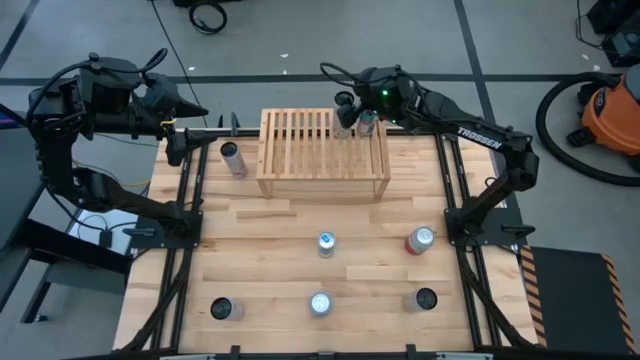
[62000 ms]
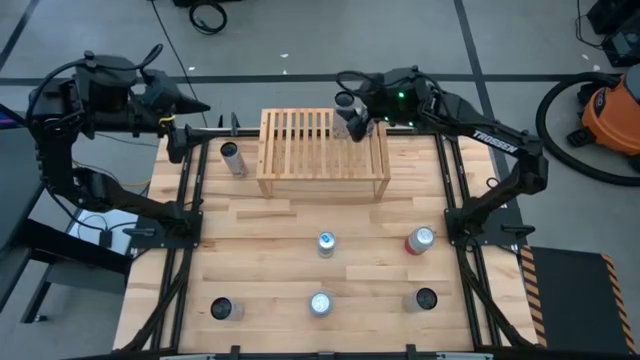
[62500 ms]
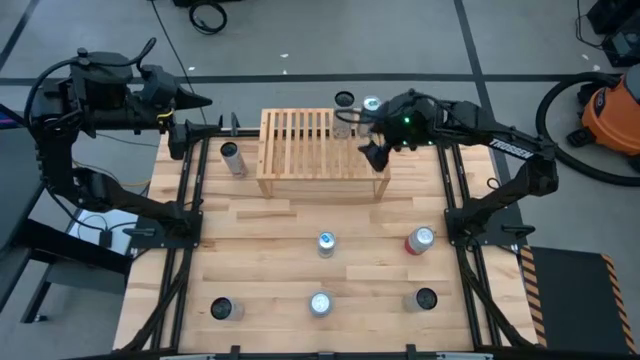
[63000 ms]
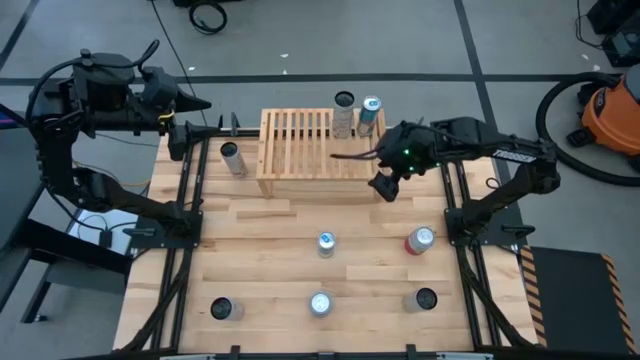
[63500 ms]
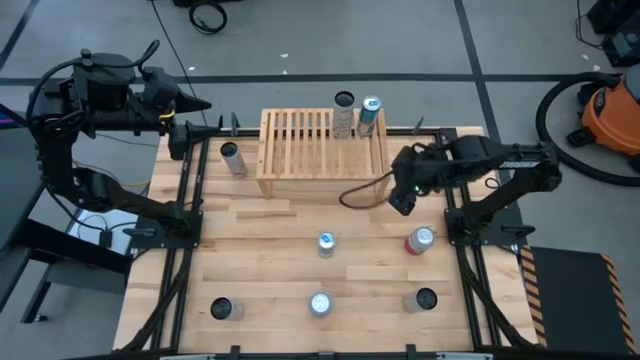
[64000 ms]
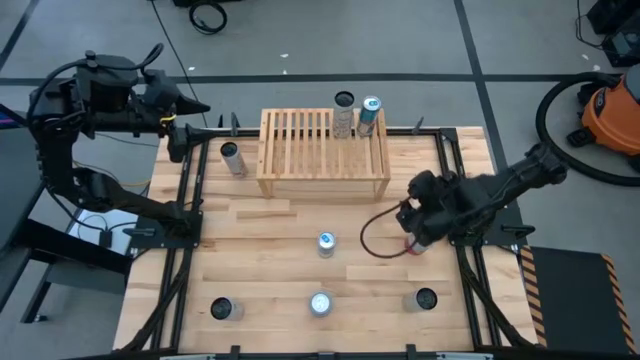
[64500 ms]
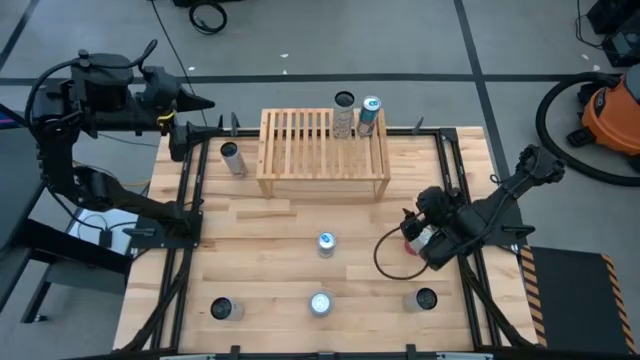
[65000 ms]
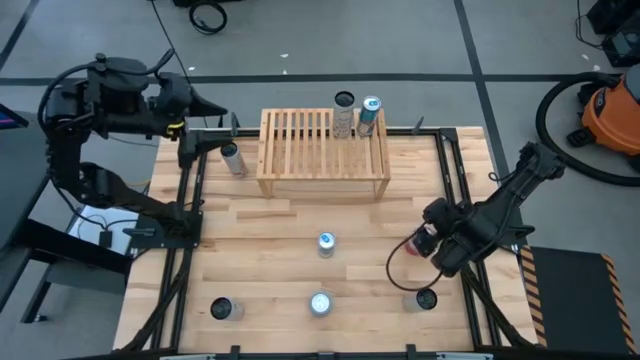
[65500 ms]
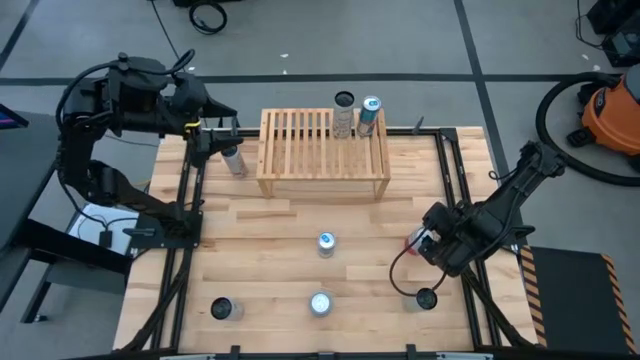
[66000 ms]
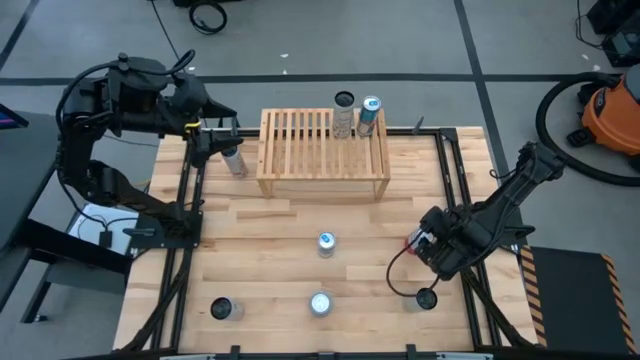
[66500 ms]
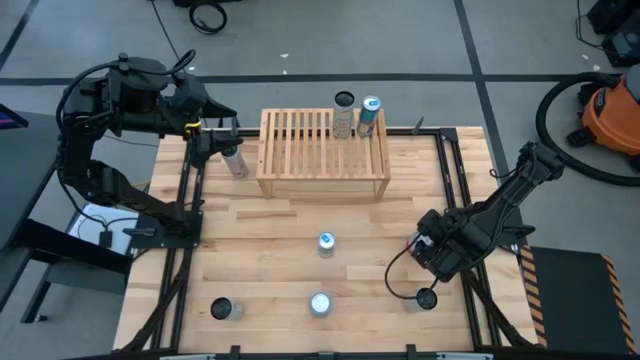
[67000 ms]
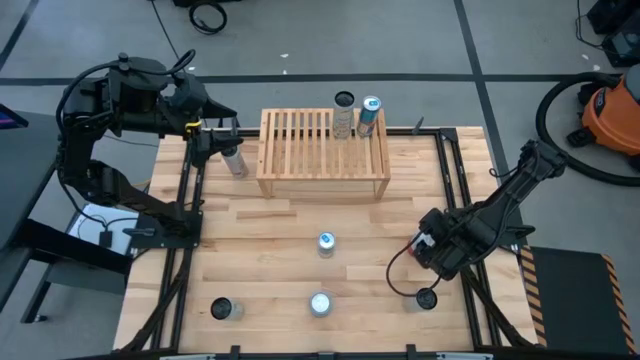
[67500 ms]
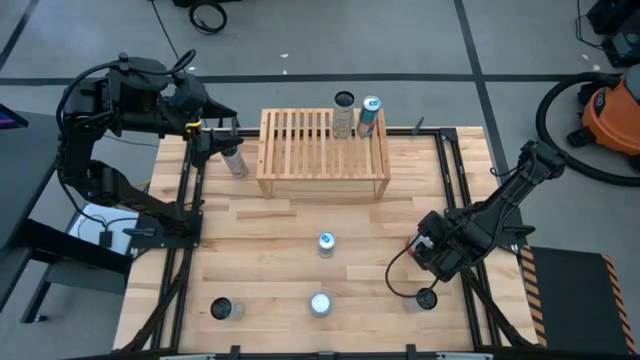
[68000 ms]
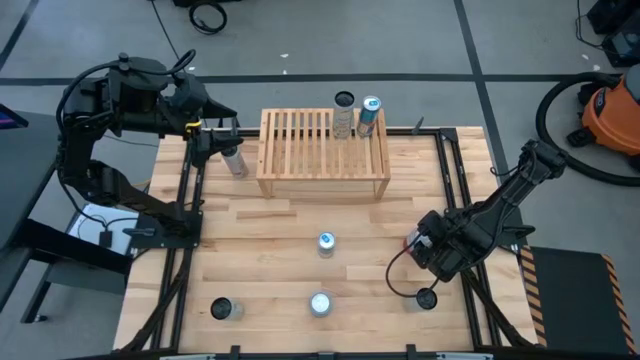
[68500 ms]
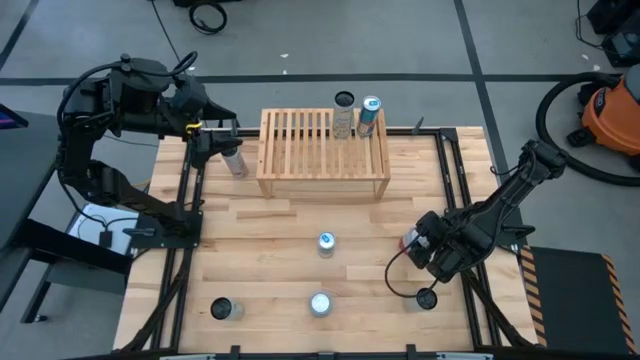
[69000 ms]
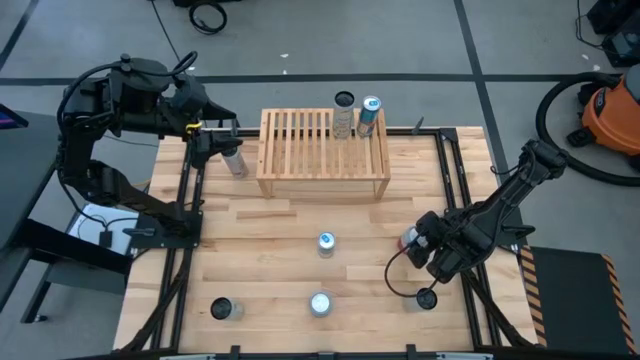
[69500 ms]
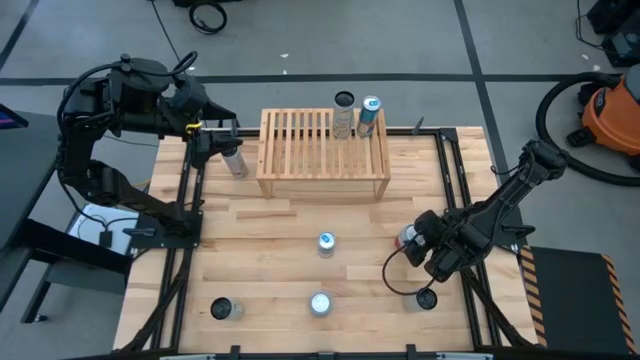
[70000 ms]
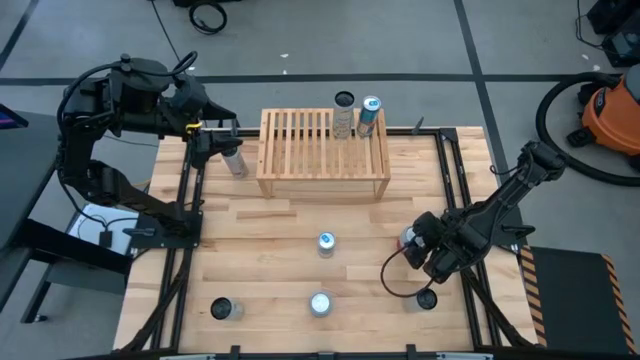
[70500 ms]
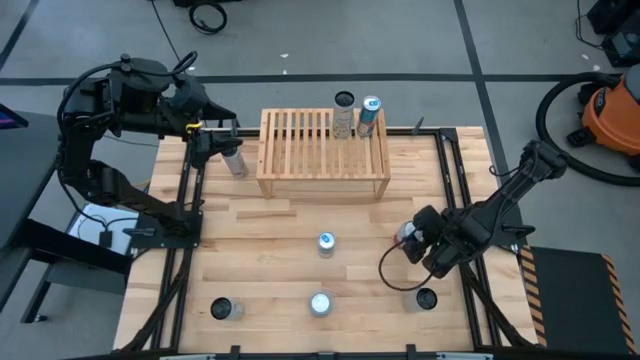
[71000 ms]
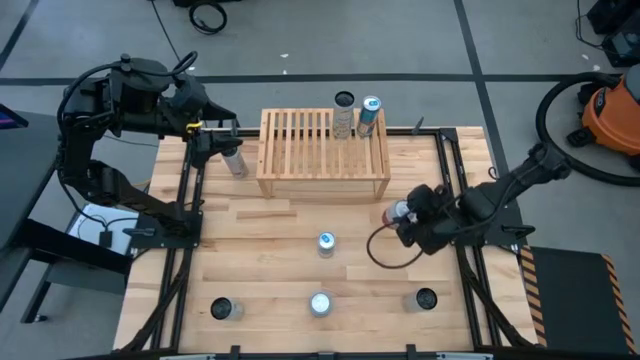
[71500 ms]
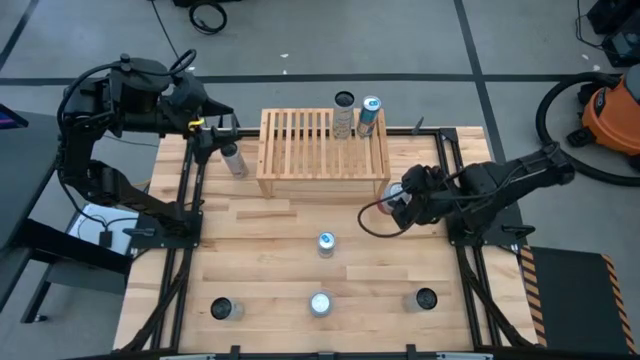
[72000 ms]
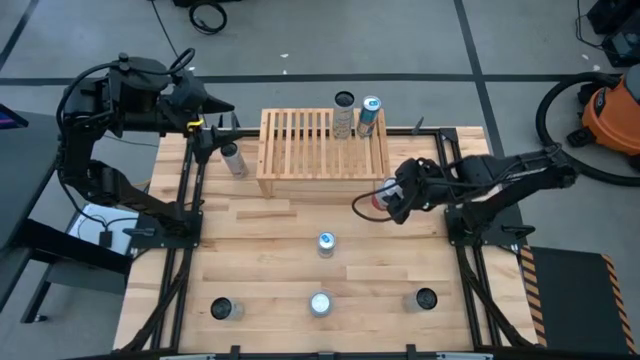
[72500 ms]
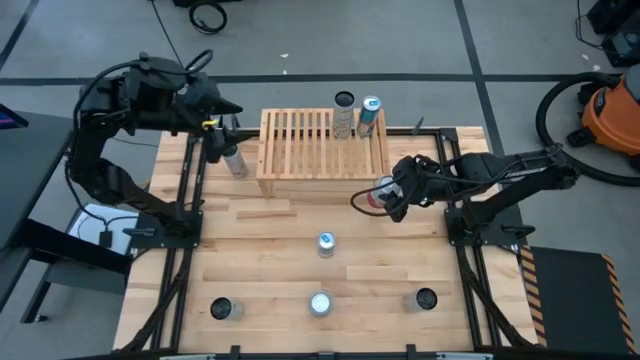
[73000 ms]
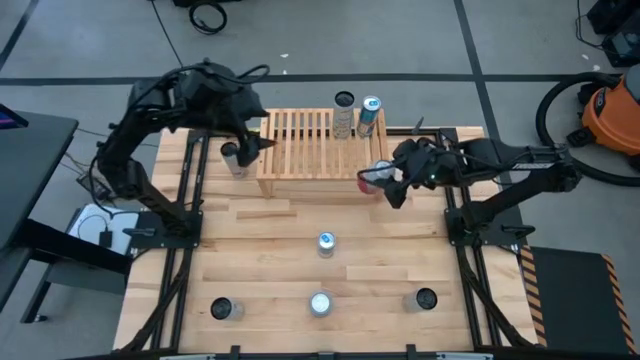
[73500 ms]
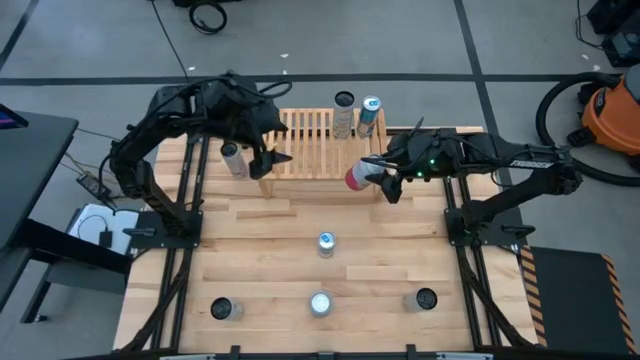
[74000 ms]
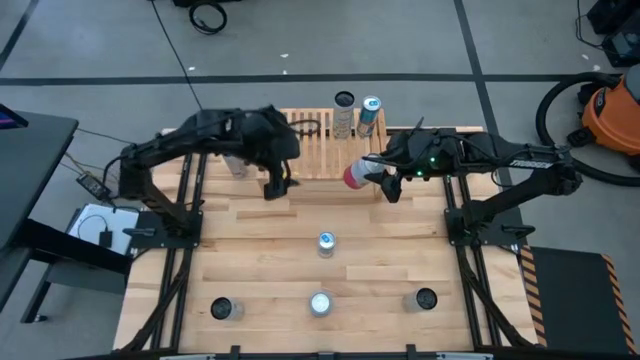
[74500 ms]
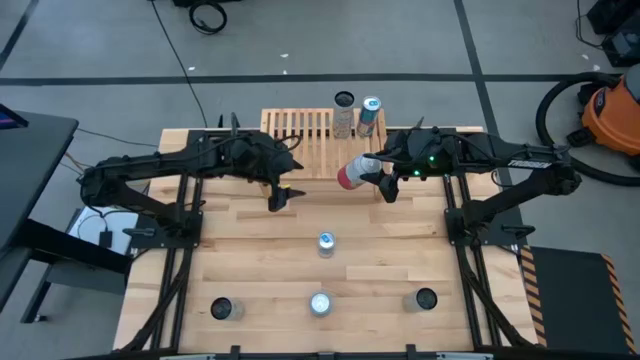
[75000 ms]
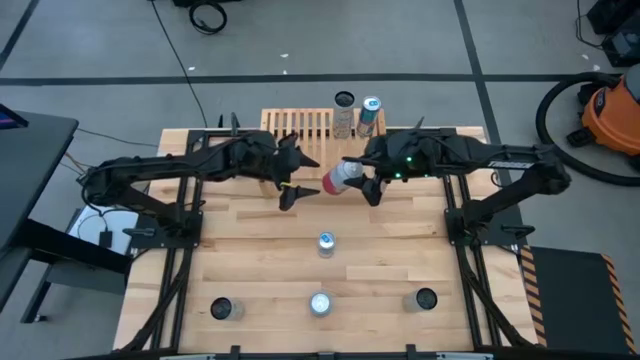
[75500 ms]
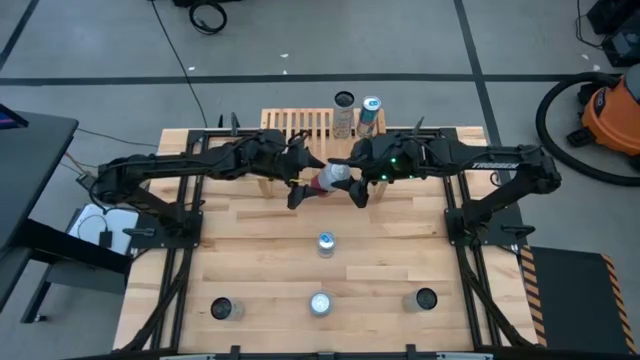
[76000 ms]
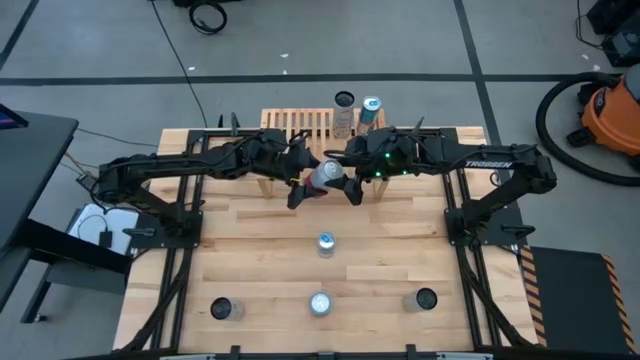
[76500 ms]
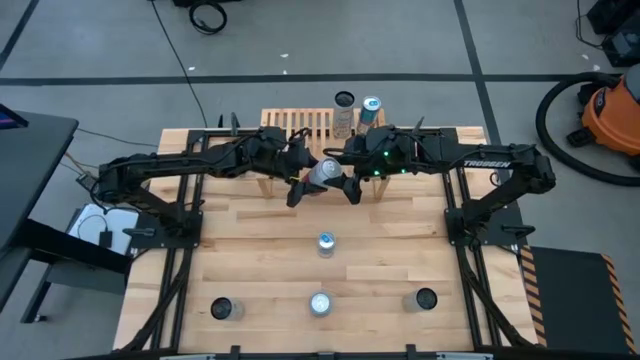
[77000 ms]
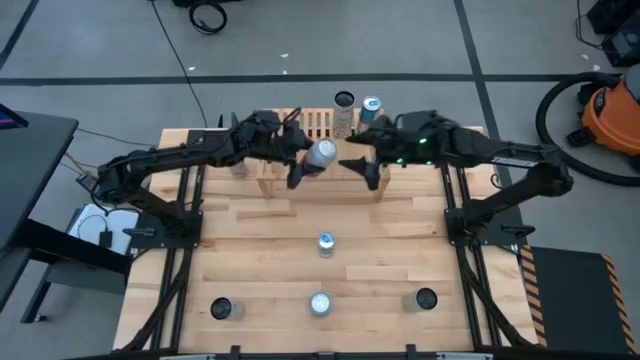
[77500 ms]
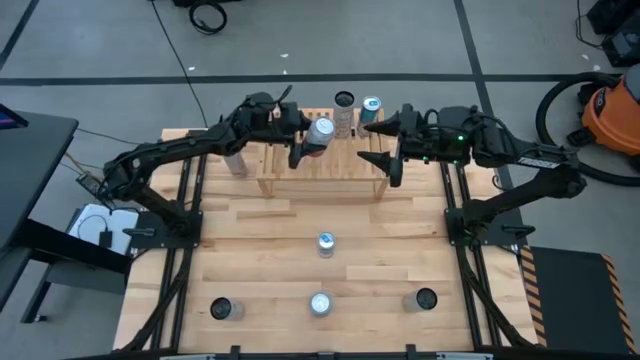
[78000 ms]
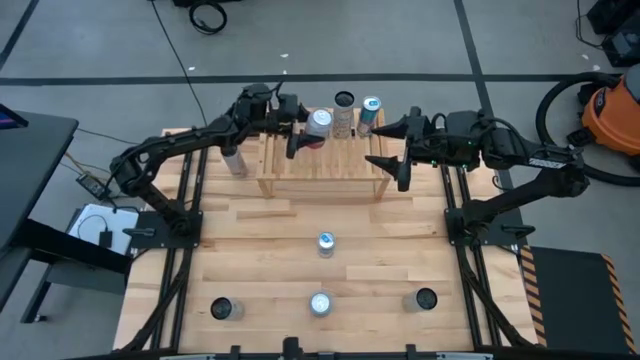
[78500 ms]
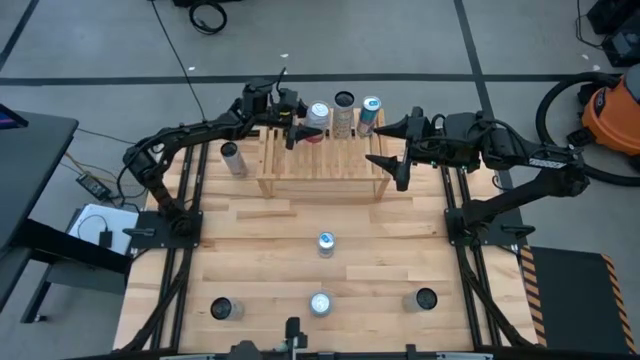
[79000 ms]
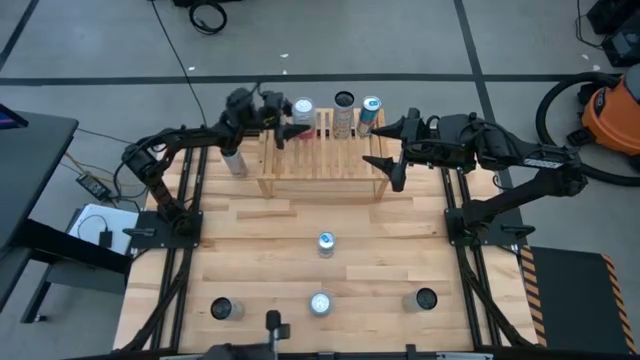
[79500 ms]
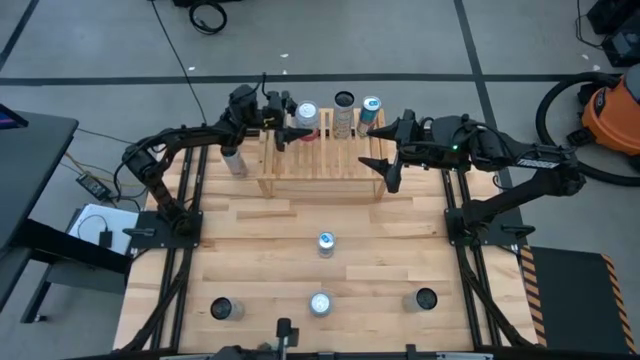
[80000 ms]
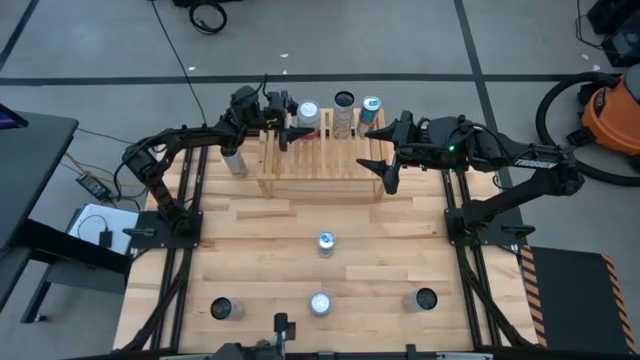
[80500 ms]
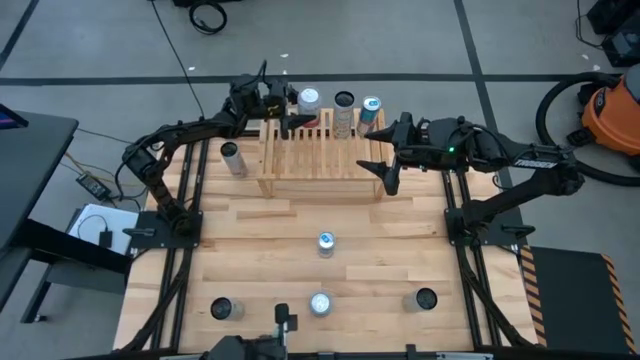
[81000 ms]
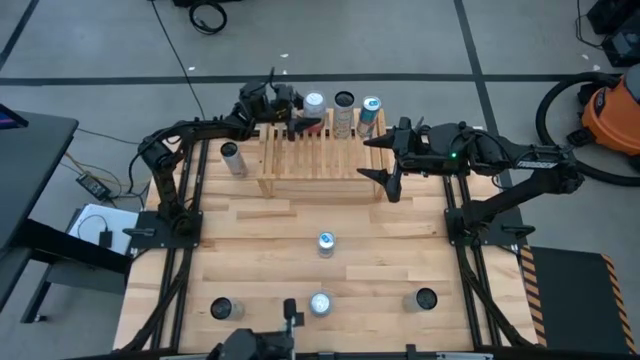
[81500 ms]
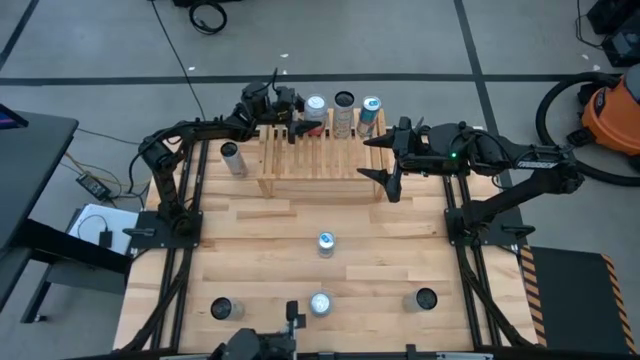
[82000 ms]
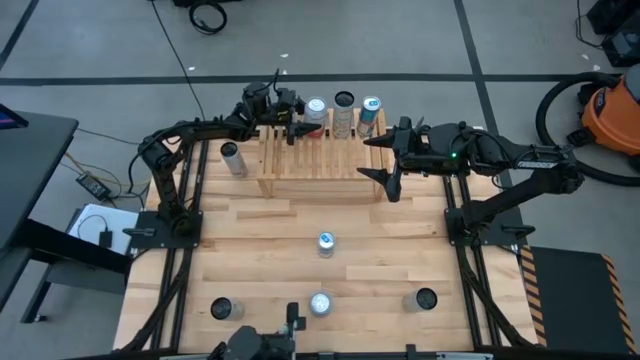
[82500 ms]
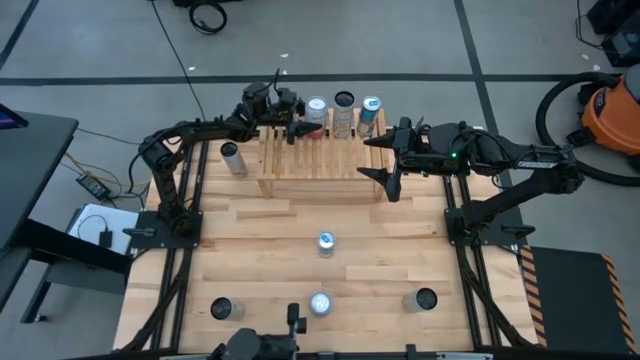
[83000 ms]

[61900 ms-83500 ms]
Task: Place canned beverage on shelf
Put the top pink and white soda can on the shelf
